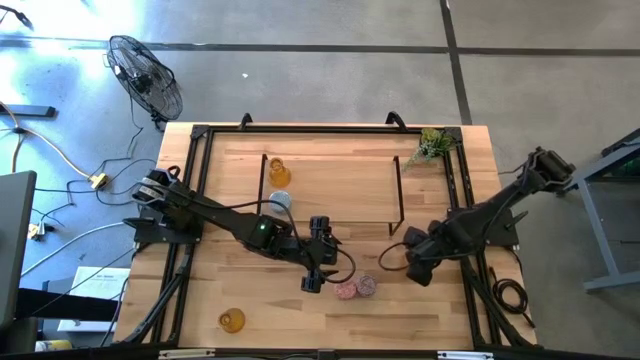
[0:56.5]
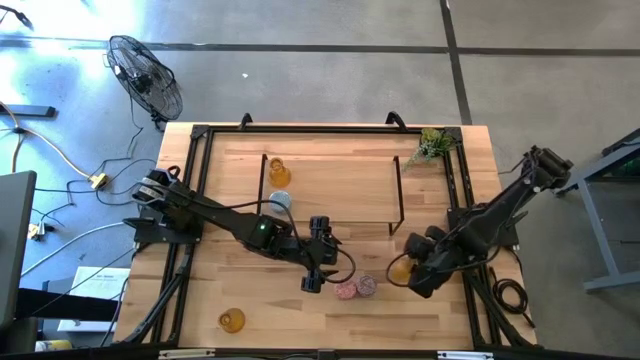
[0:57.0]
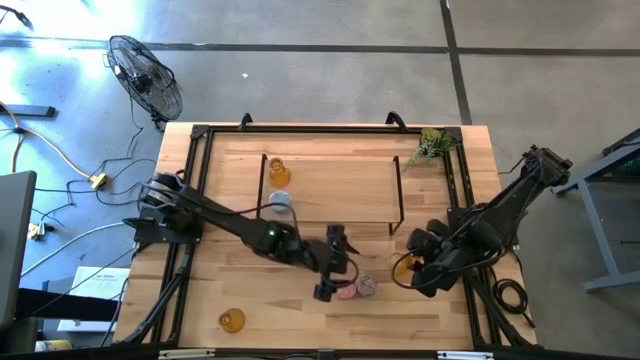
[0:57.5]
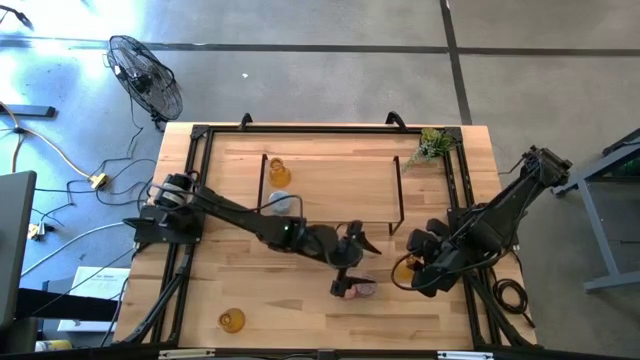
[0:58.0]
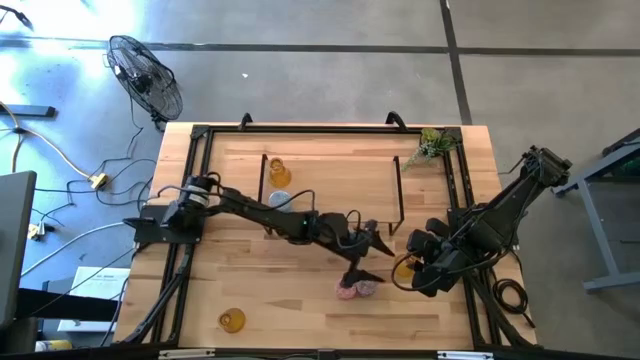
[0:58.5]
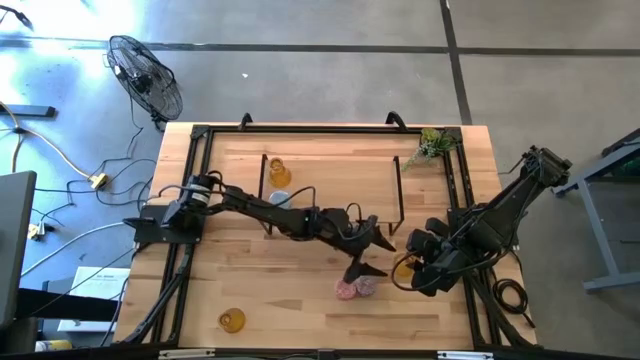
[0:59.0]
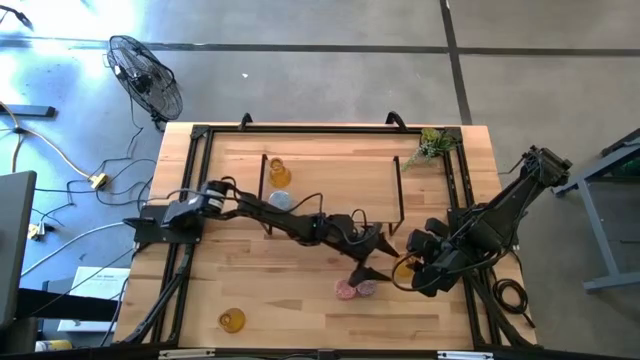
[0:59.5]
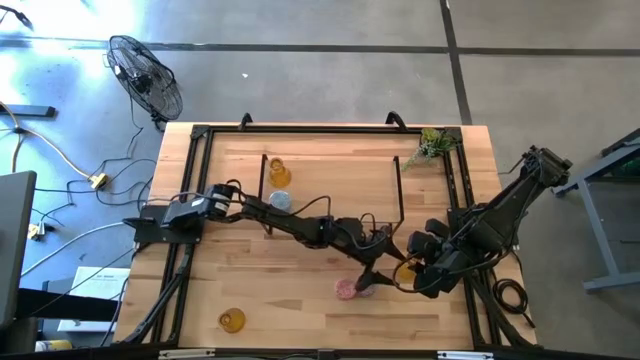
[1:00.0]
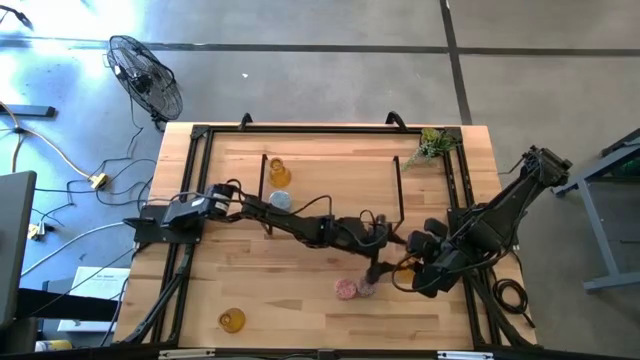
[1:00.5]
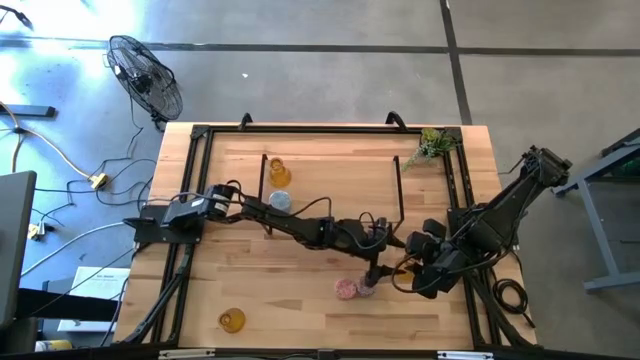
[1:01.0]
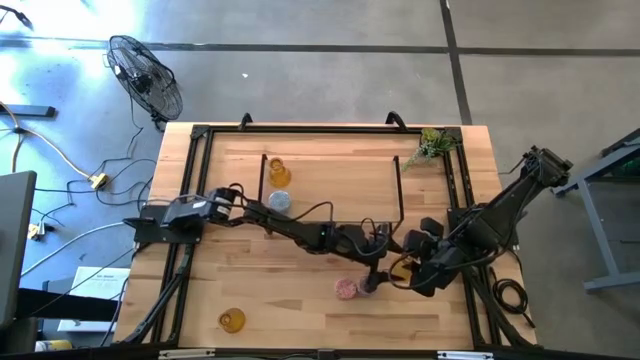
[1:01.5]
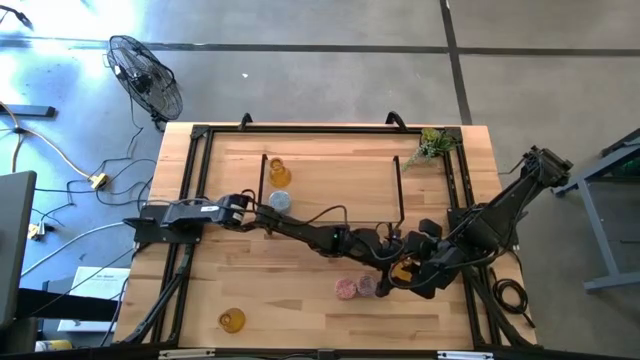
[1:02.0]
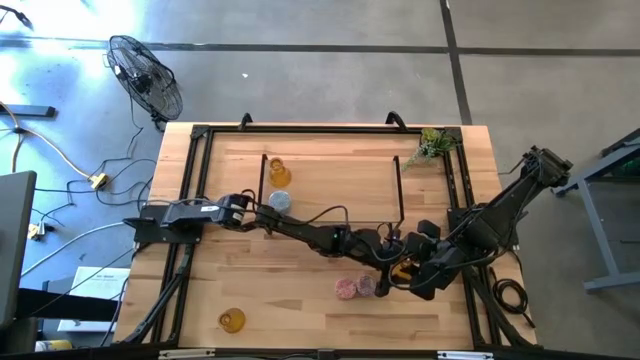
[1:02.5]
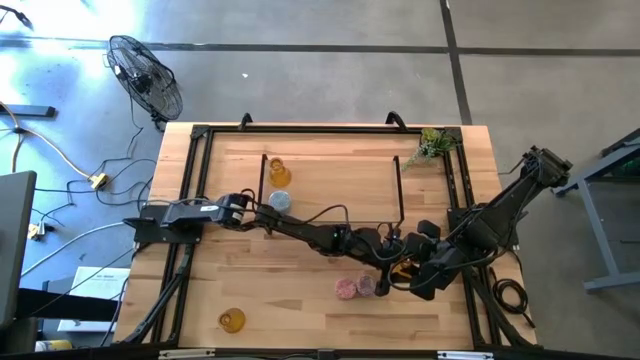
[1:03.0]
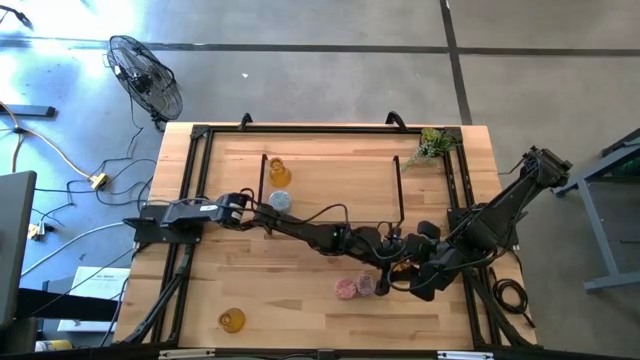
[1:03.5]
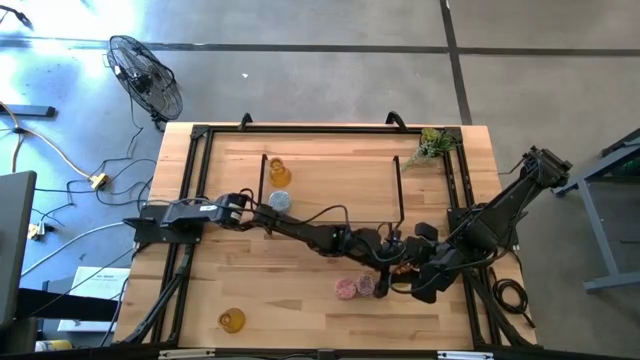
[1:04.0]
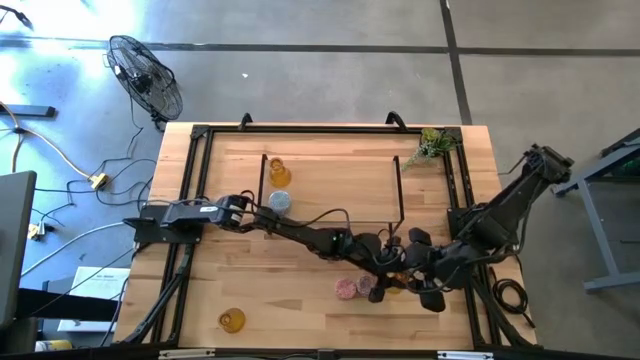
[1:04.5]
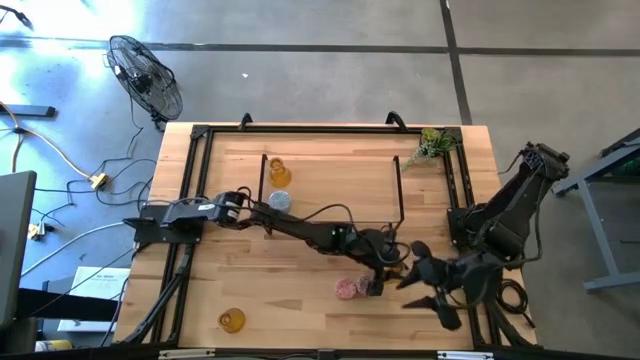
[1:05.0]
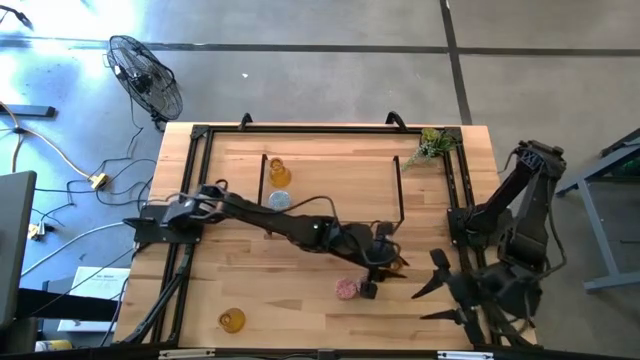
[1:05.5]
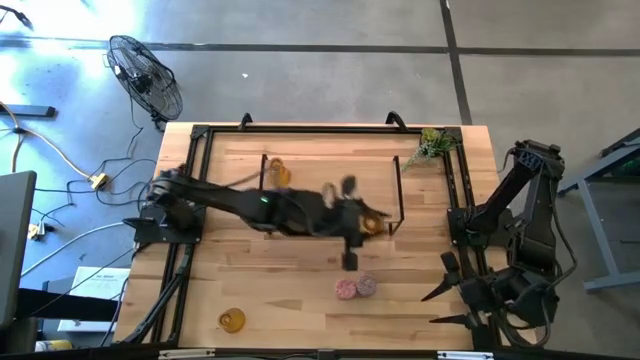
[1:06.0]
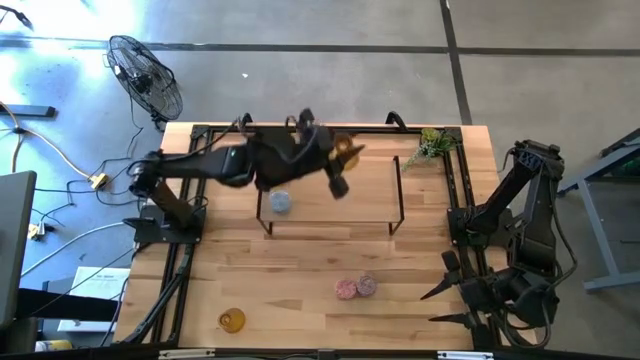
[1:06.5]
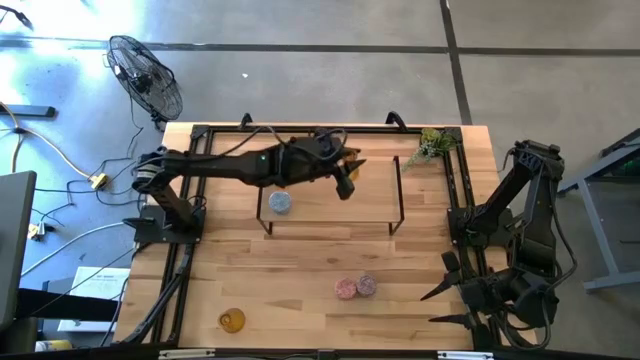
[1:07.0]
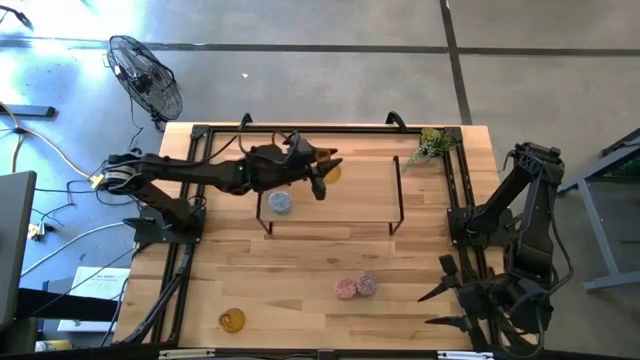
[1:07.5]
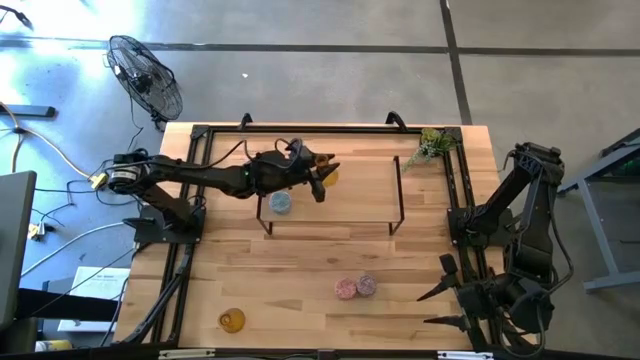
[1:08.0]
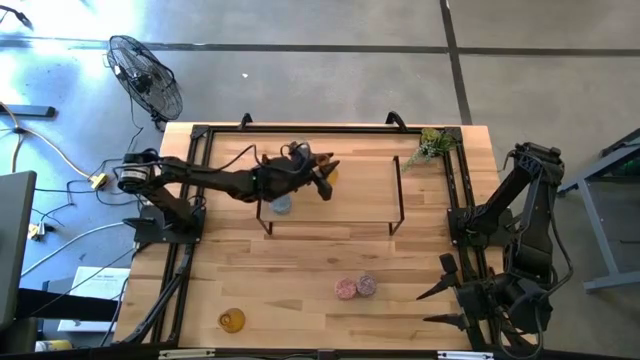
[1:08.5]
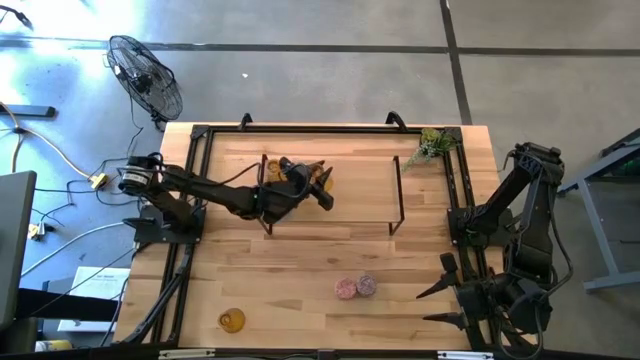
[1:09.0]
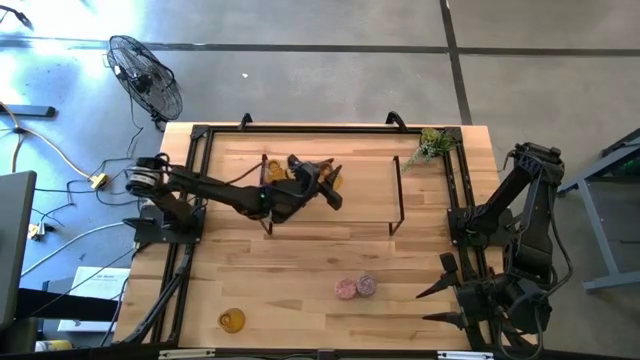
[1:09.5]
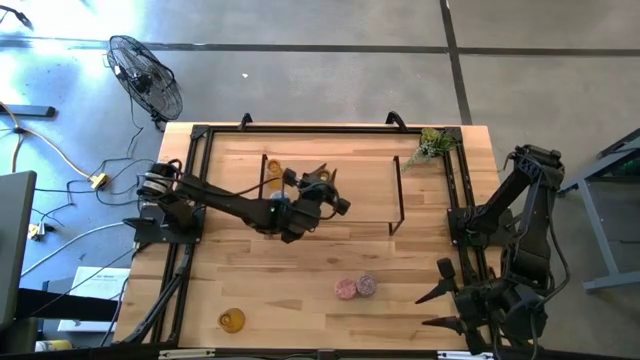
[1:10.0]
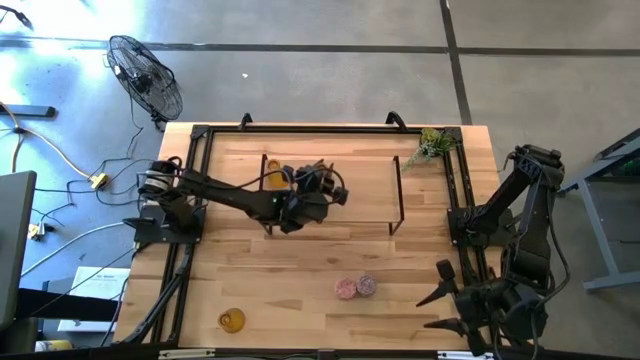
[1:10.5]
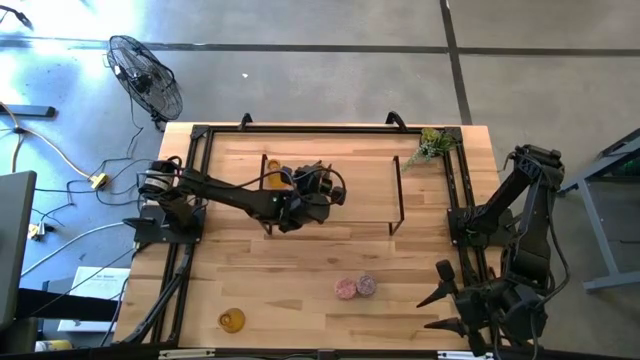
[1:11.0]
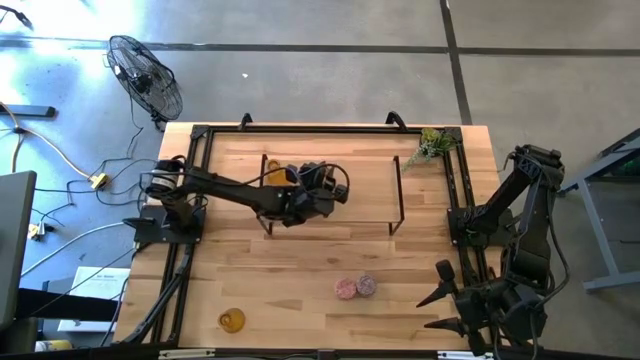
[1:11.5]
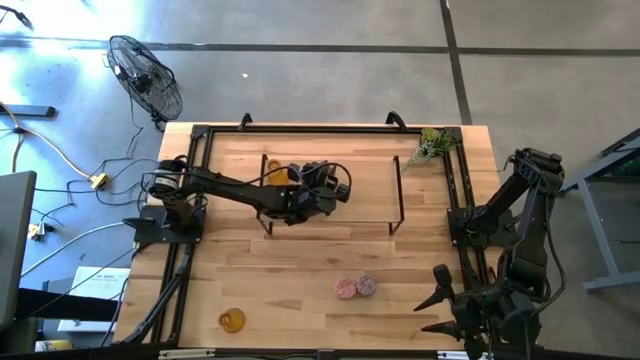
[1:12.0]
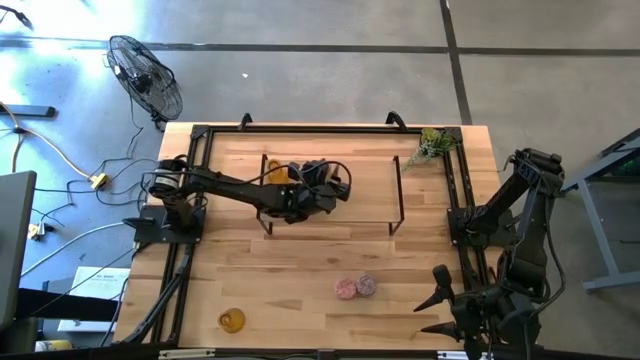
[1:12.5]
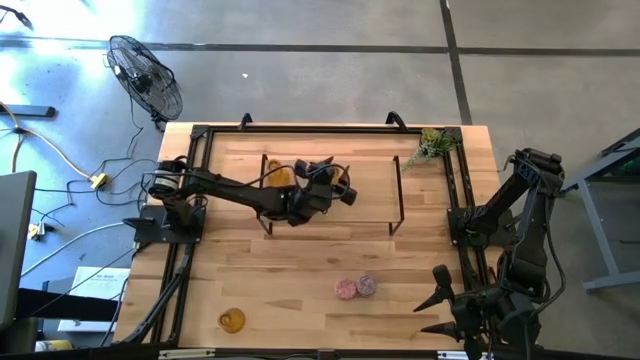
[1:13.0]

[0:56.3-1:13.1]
Task: Pick & Place candle stick holders
Put the top yellow glass candle holder on the shelf aligned with the other glass candle holder

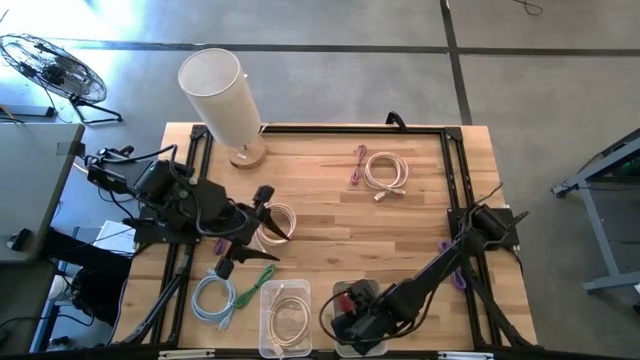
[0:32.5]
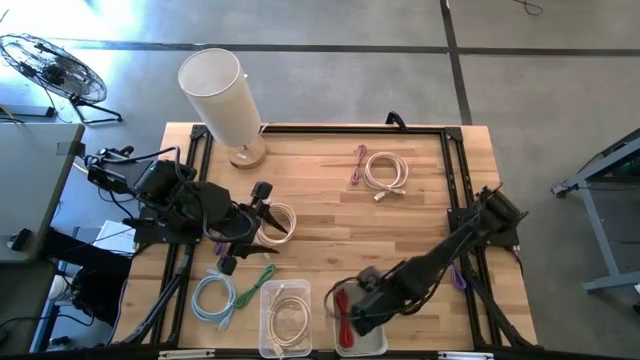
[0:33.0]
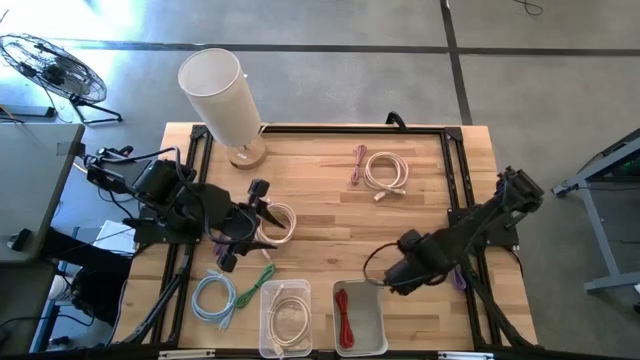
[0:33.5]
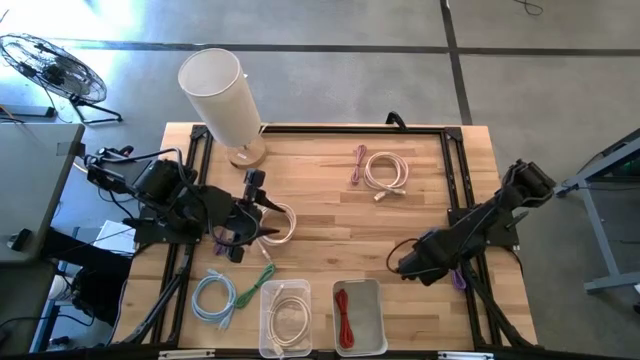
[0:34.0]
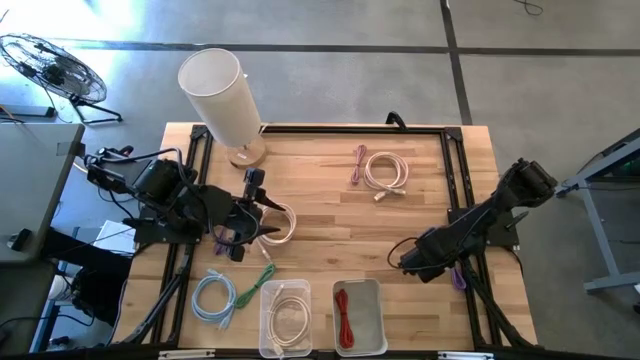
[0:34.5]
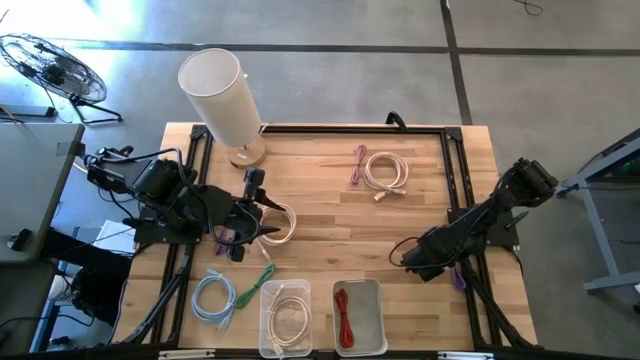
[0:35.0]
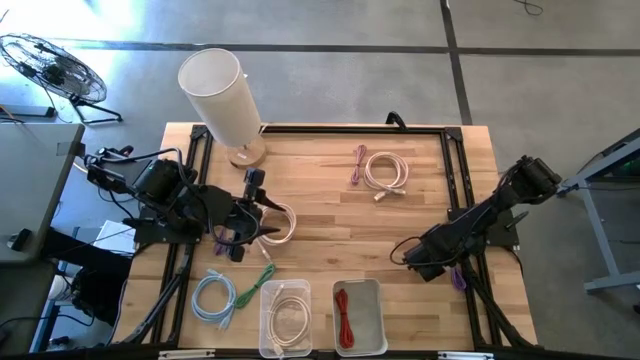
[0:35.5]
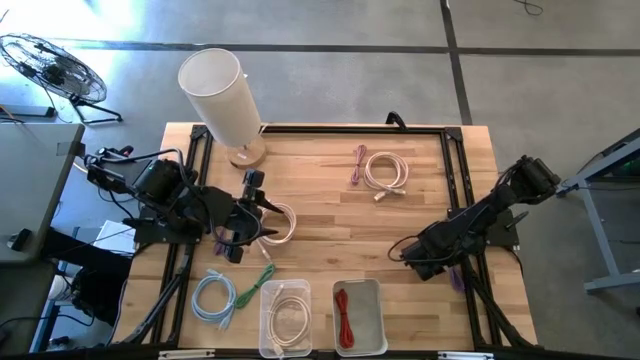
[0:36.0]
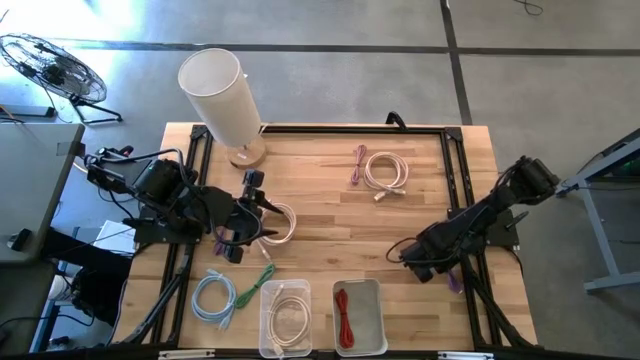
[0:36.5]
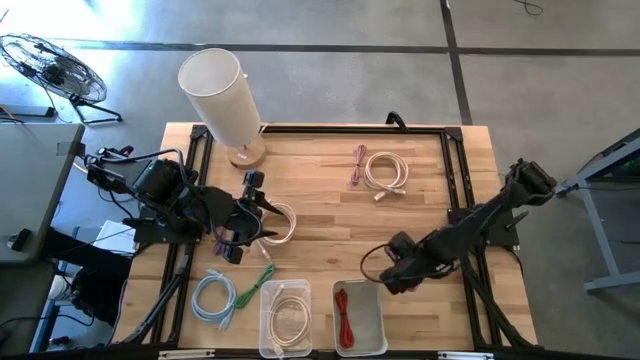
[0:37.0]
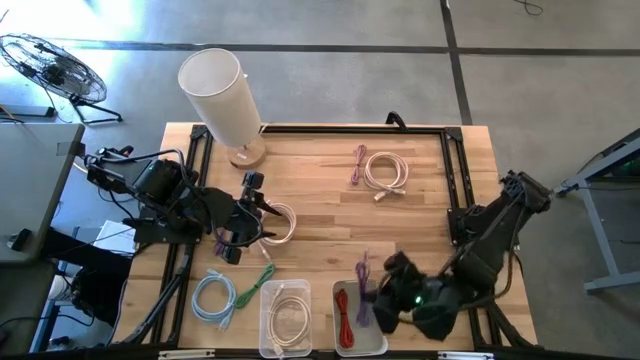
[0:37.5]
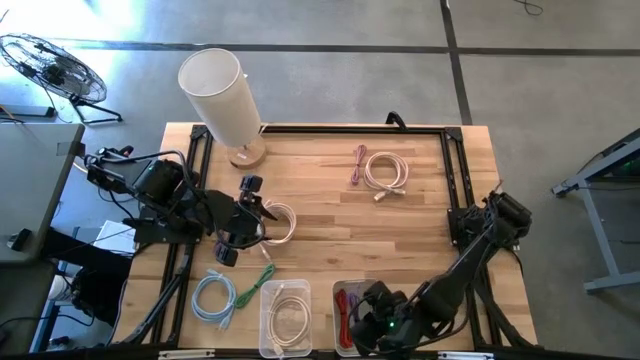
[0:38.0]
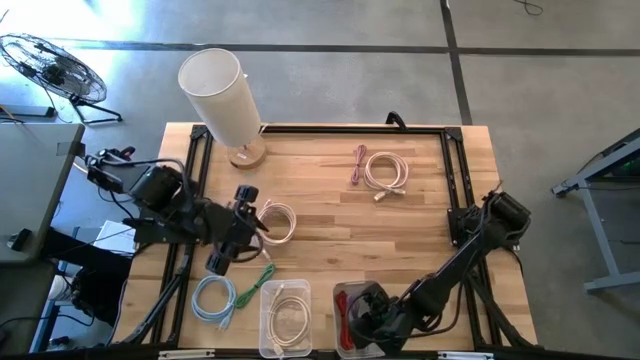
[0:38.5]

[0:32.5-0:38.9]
Task: Pick & Place USB Port
Put the right violet USB cable into the gray bin
